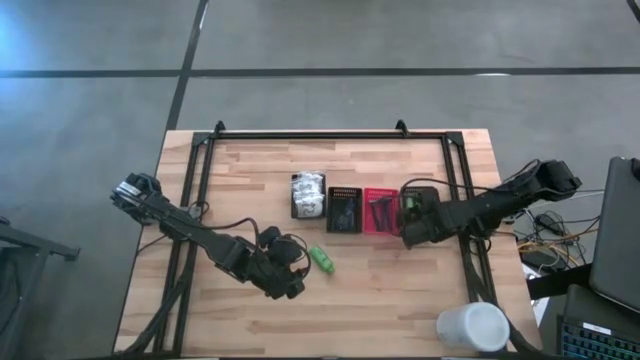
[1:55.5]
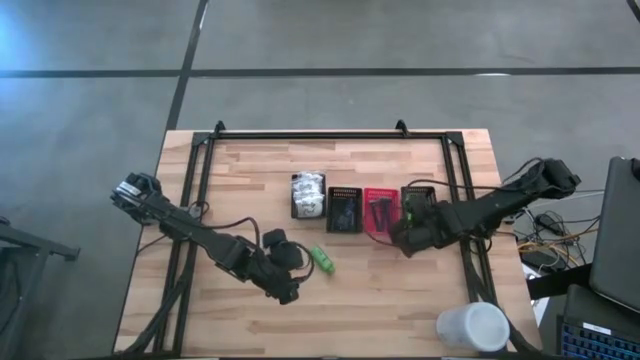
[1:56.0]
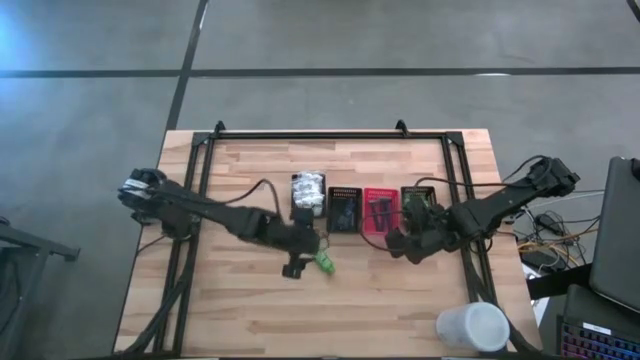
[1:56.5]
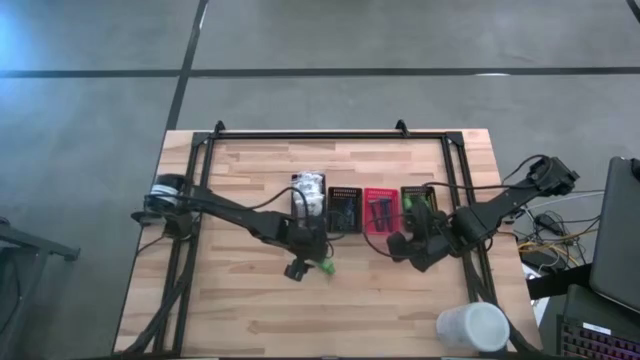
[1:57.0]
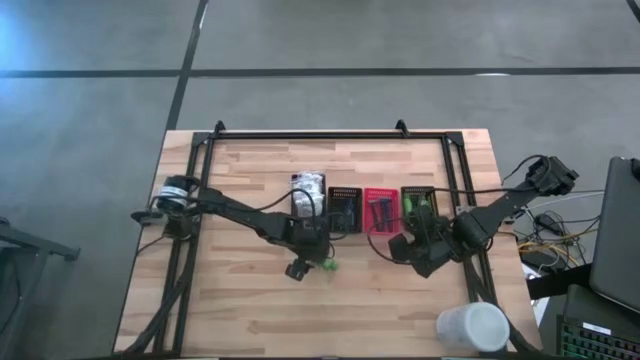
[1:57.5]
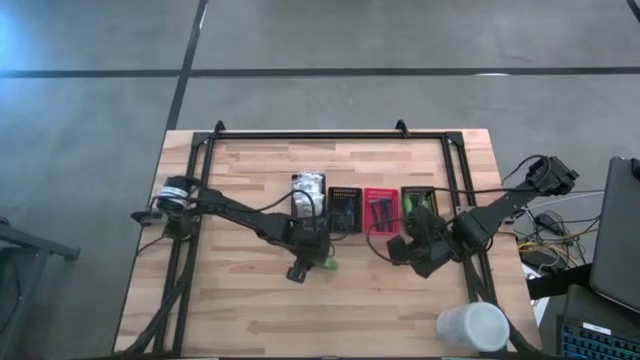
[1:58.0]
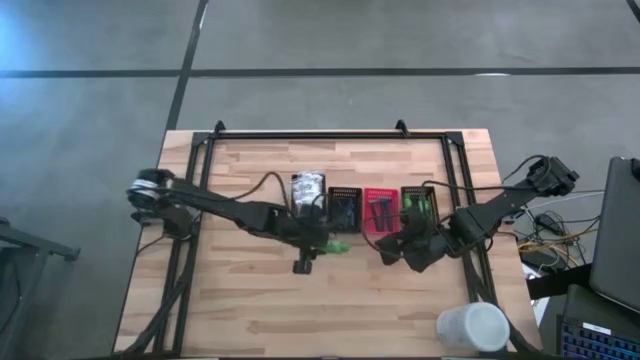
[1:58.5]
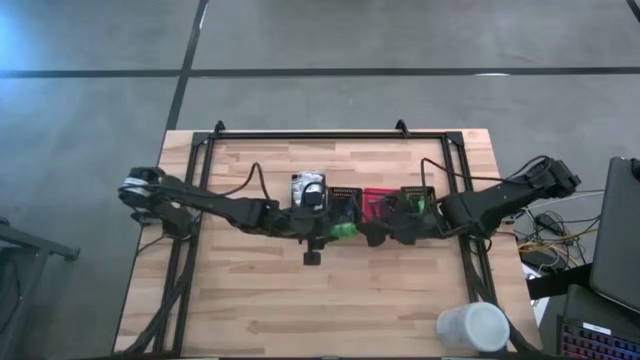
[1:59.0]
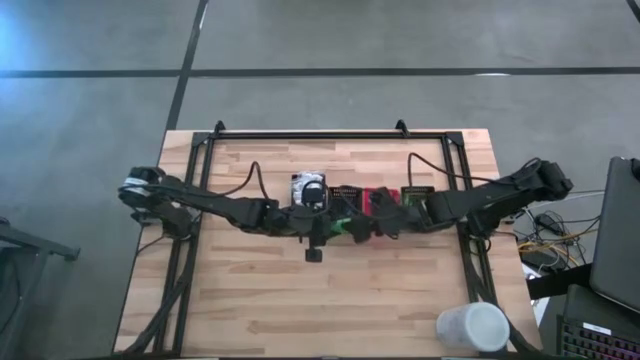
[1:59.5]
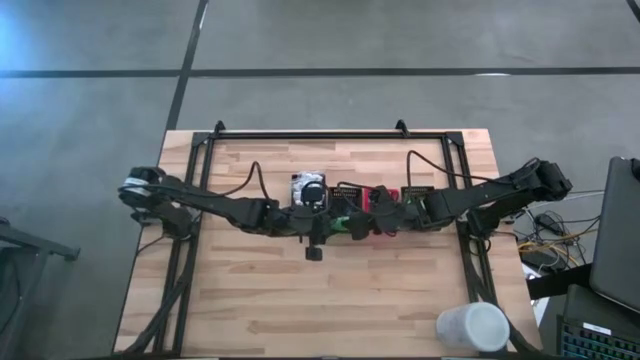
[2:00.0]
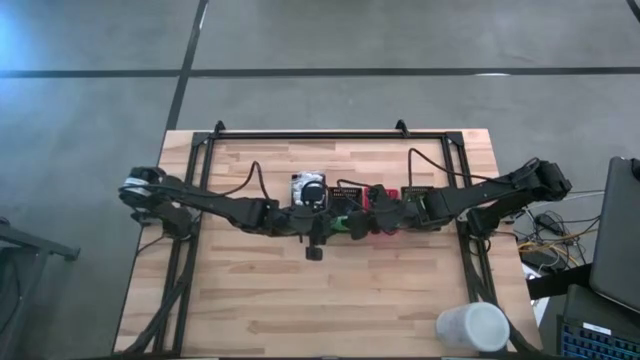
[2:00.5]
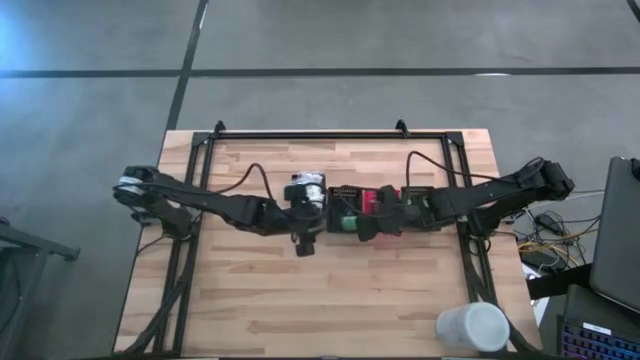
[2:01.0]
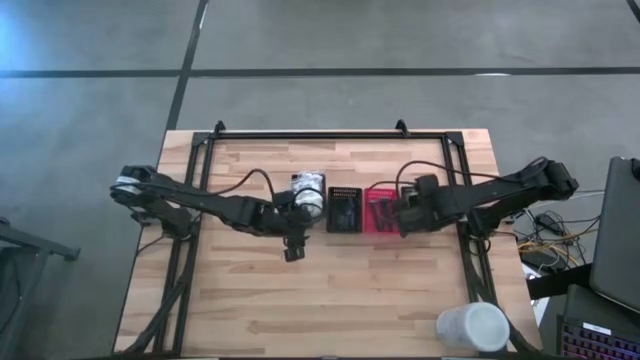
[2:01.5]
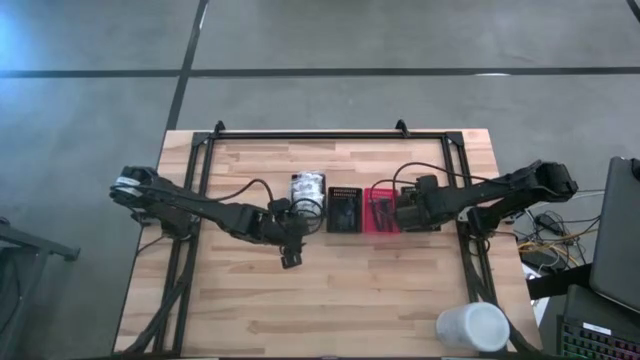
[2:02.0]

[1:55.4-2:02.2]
Task: Pick & Place Travel size toiletries
Put the green shampoo into the right black bin

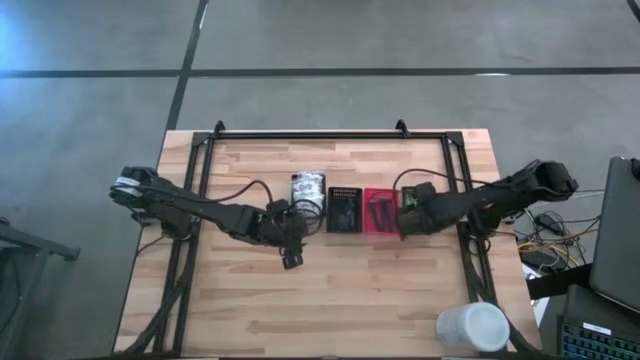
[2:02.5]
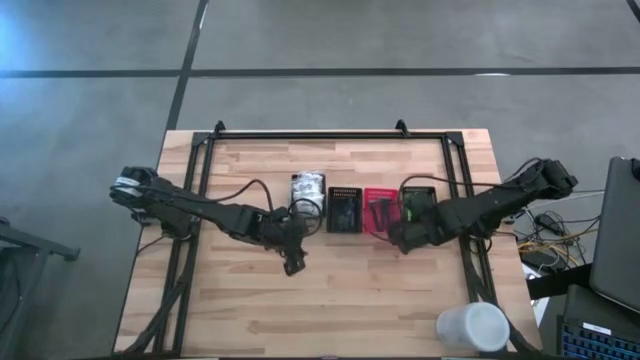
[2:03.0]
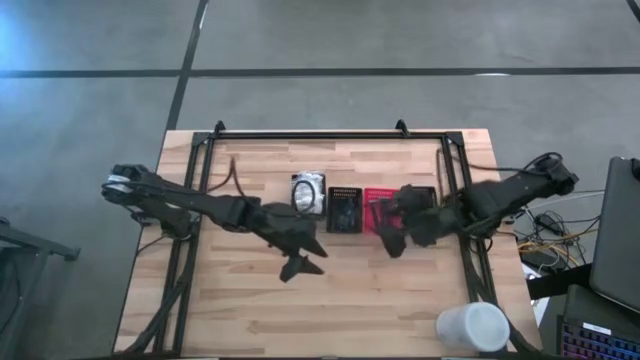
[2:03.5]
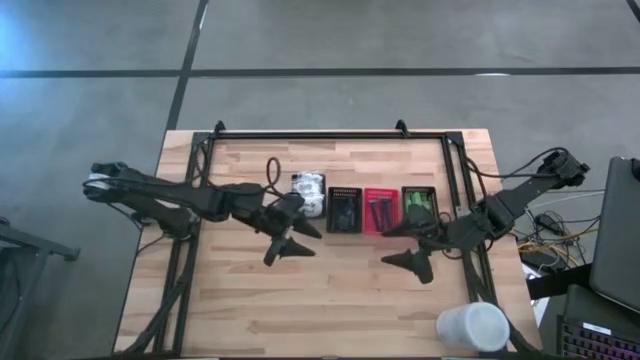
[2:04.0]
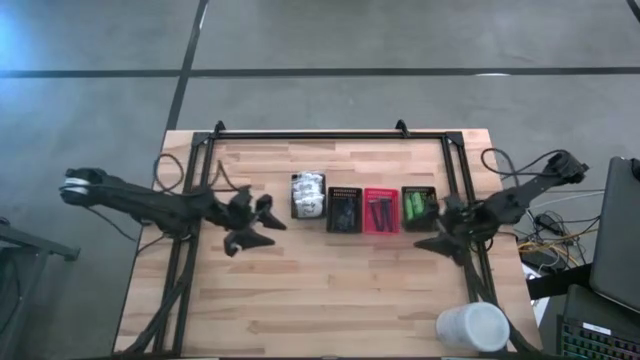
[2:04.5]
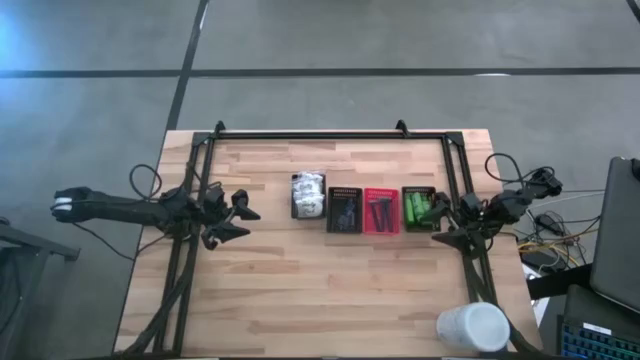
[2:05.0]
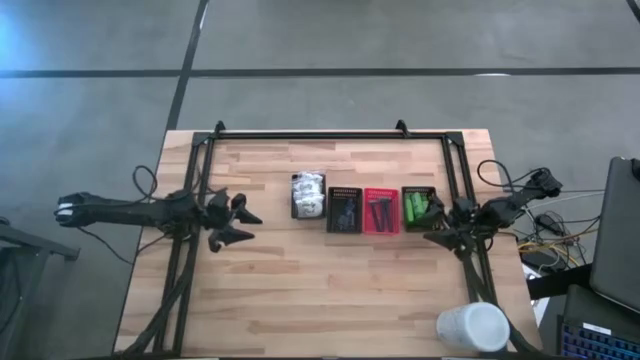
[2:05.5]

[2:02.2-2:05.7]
Return to Home Position

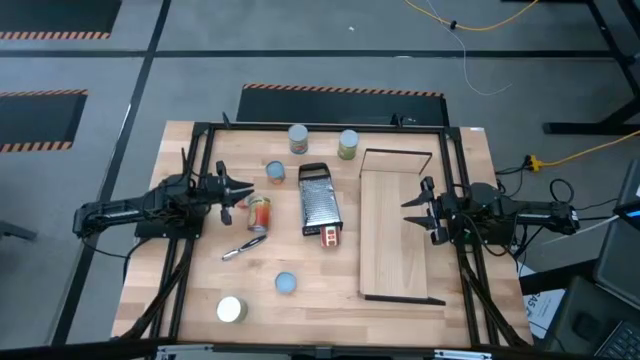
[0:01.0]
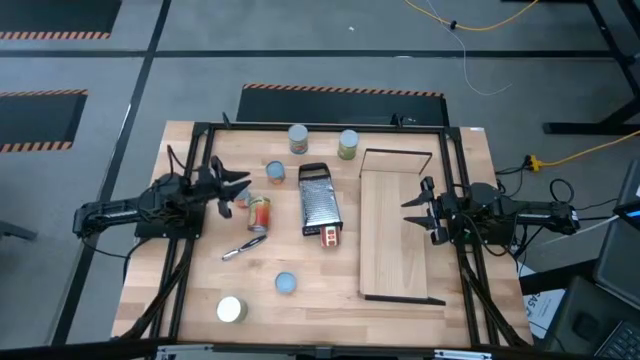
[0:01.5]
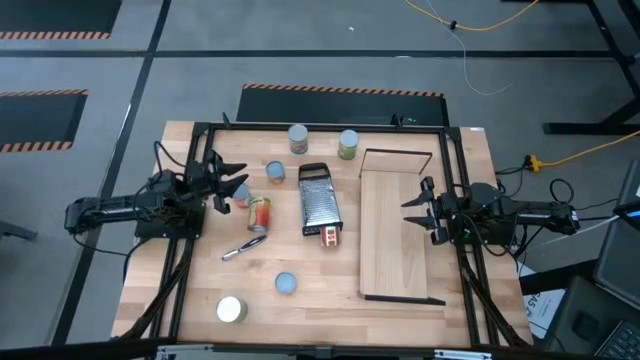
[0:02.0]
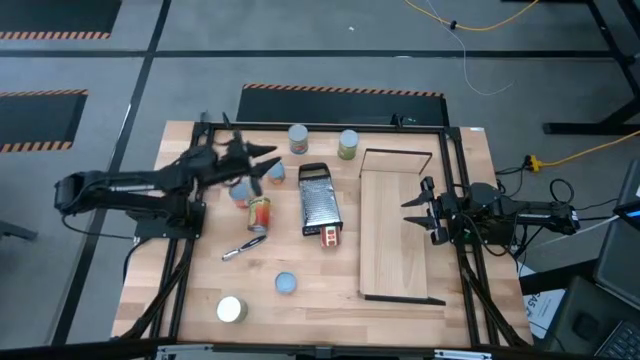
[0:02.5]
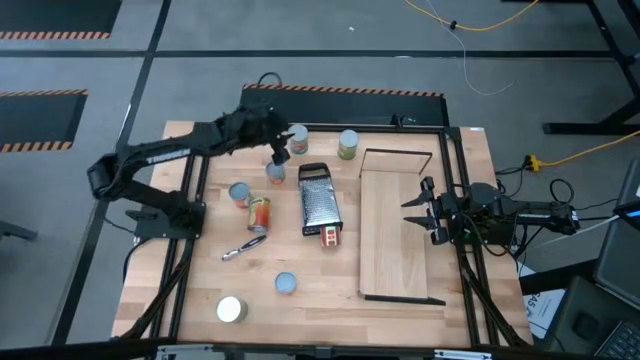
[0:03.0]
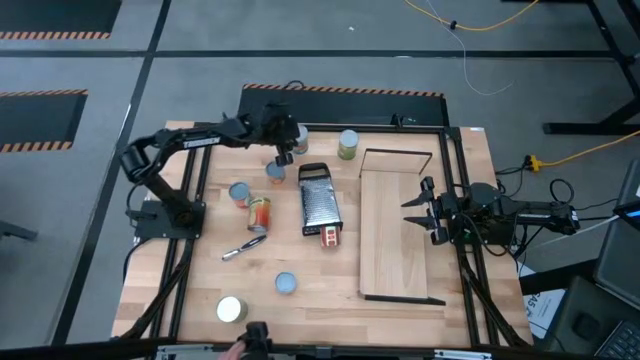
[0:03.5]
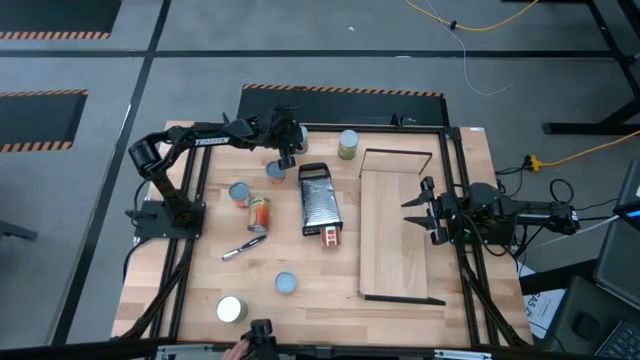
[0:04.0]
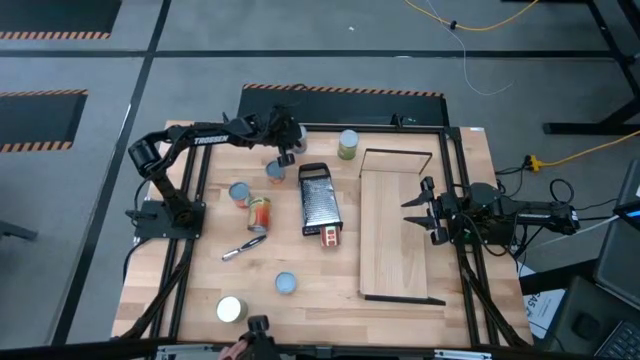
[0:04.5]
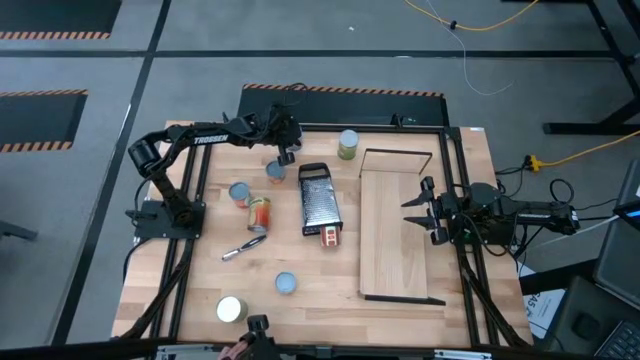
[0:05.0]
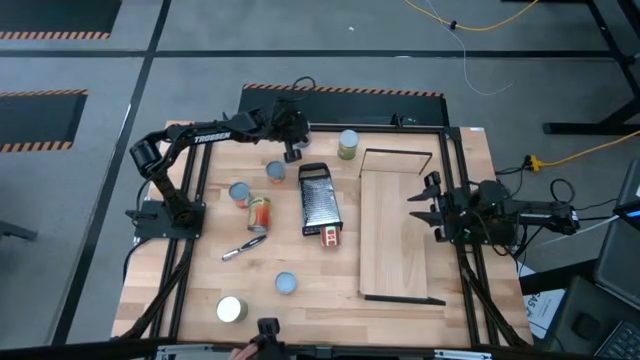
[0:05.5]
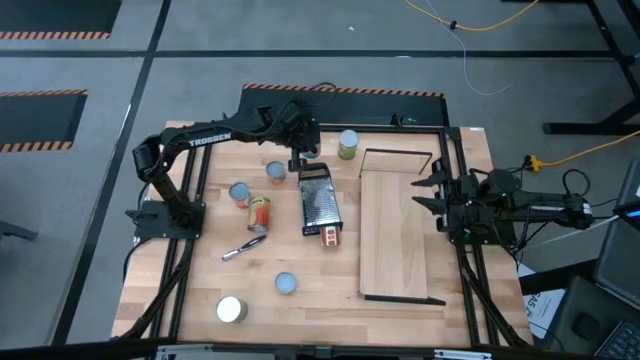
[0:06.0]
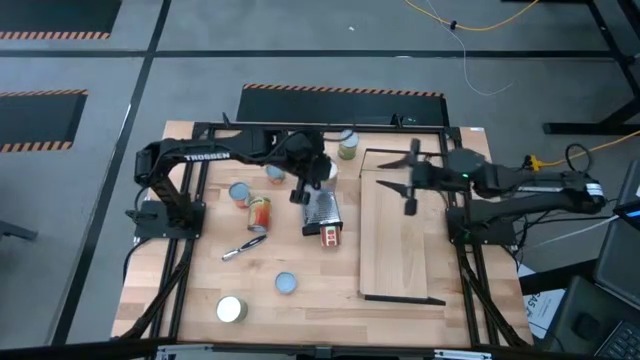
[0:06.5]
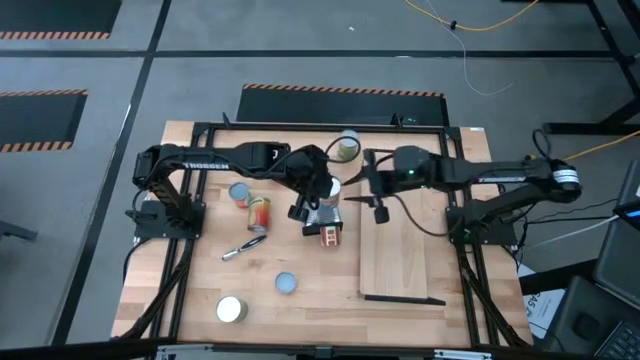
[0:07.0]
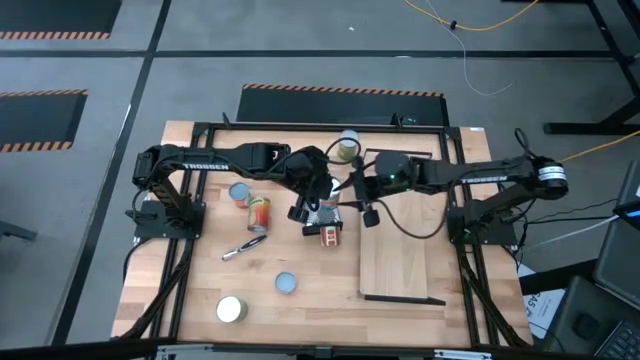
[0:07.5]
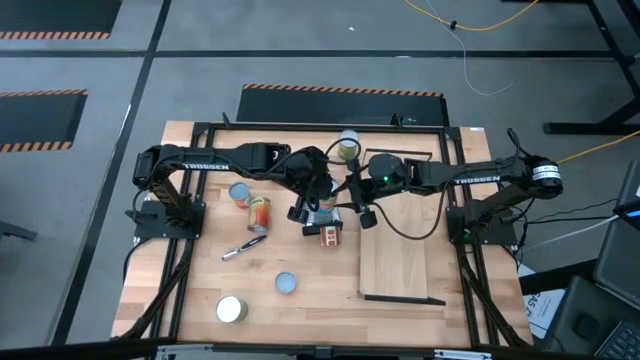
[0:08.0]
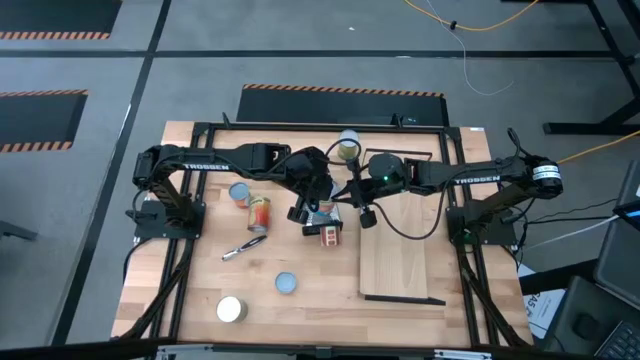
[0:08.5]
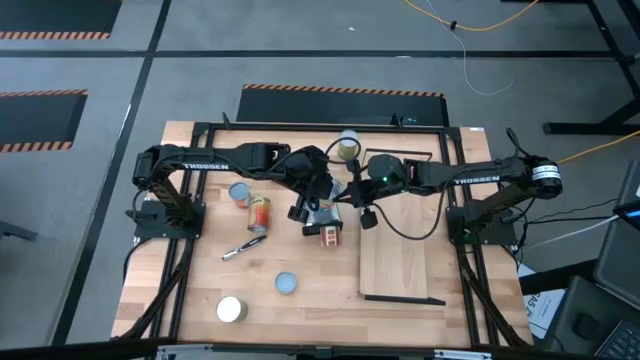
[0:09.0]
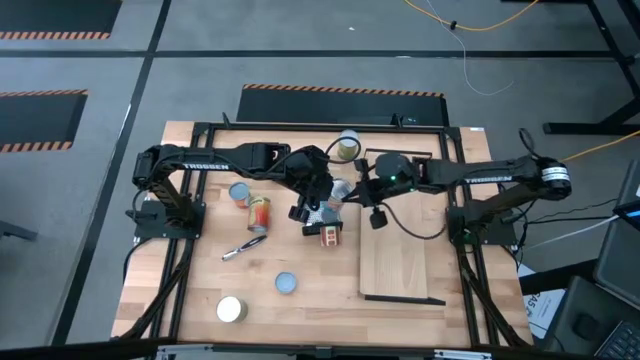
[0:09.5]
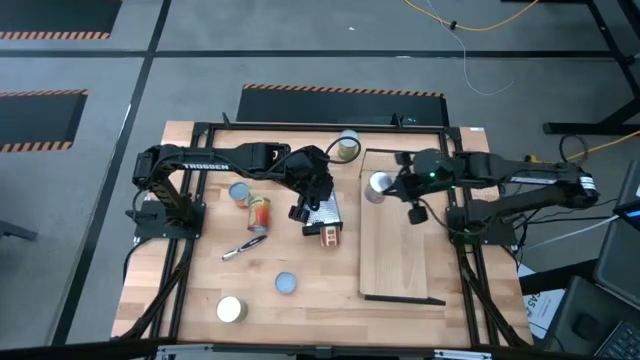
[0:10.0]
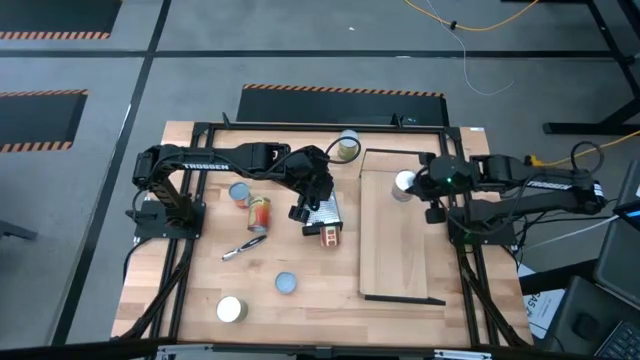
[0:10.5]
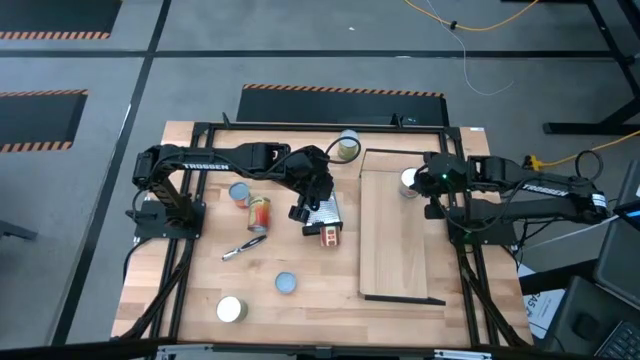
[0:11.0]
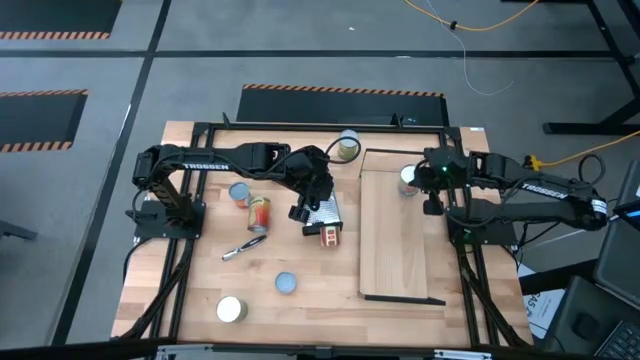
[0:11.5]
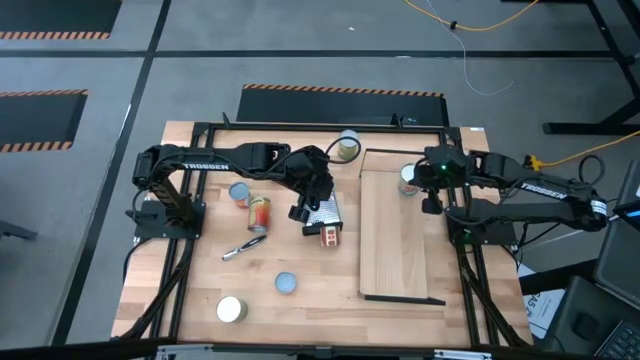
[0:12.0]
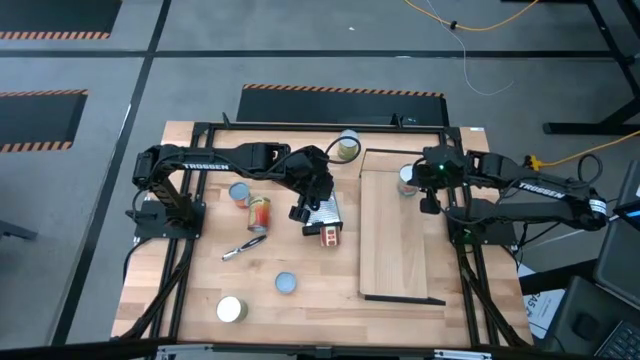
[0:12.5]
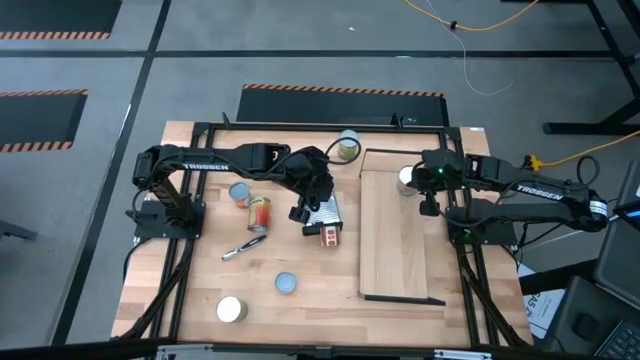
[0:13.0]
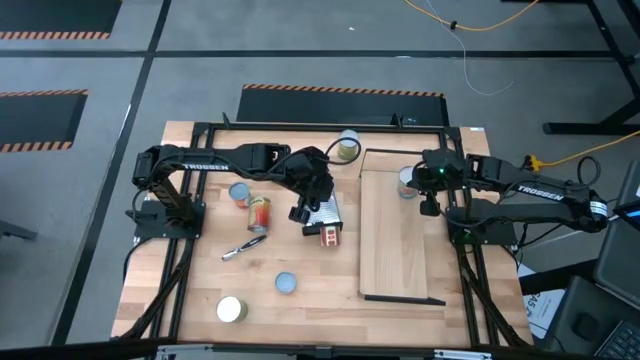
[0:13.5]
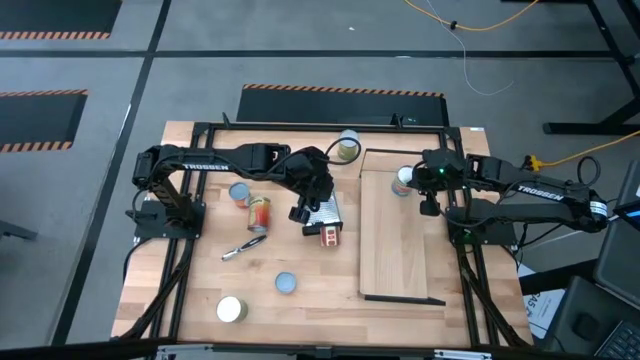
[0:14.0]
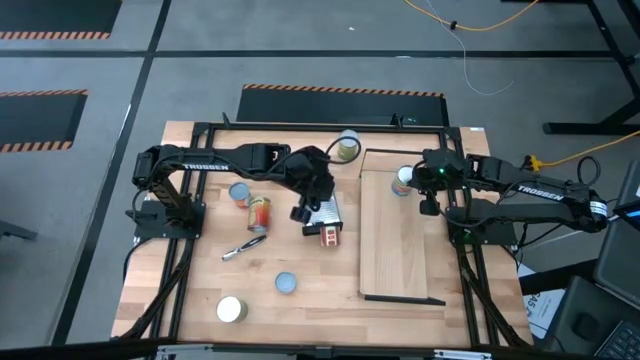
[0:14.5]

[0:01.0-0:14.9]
Task: Pick and place cans onto a shelf
Put the canned tomatoes on the shelf
